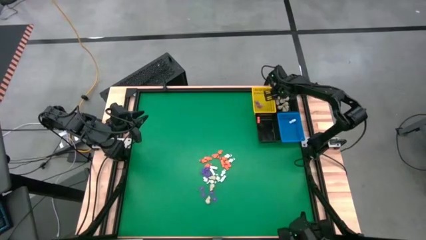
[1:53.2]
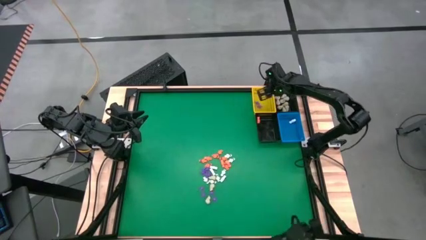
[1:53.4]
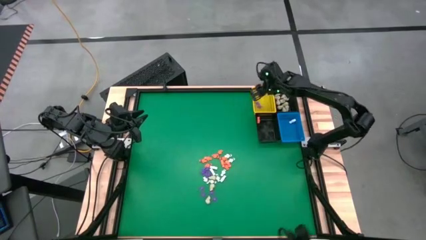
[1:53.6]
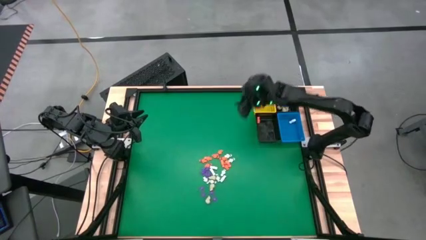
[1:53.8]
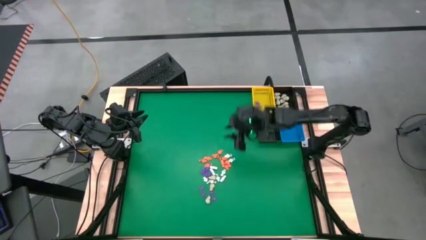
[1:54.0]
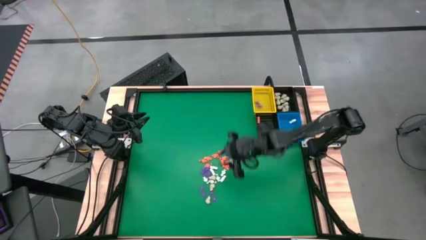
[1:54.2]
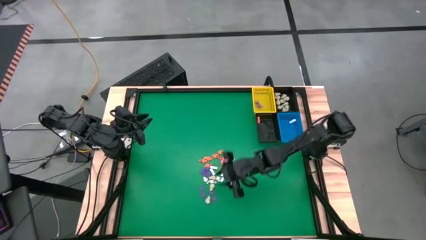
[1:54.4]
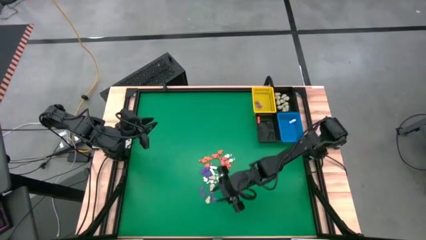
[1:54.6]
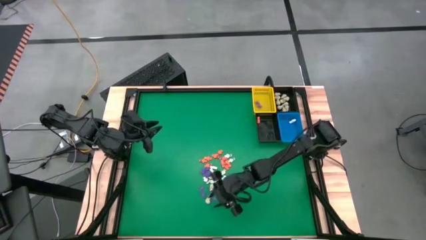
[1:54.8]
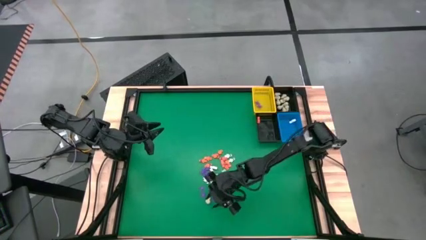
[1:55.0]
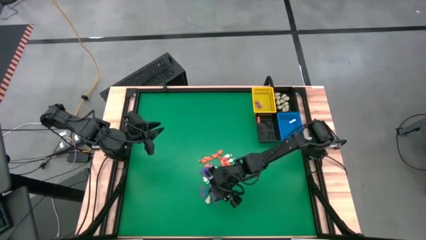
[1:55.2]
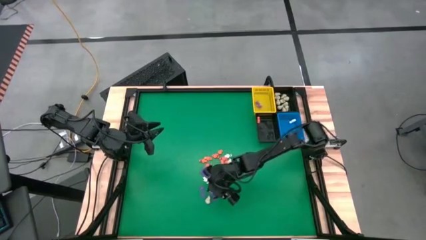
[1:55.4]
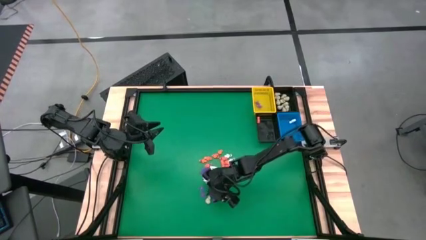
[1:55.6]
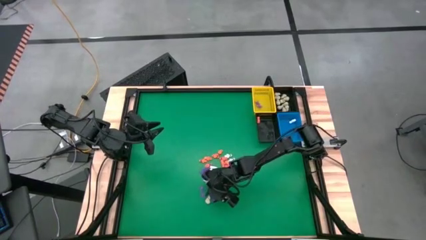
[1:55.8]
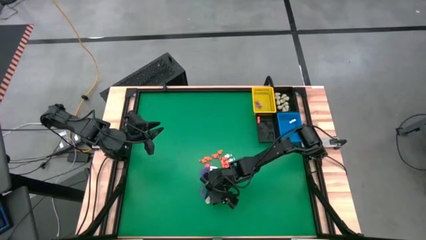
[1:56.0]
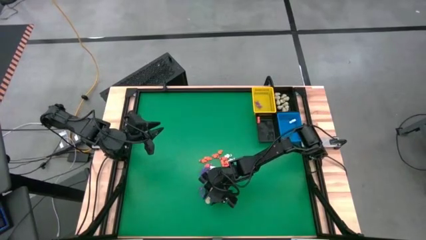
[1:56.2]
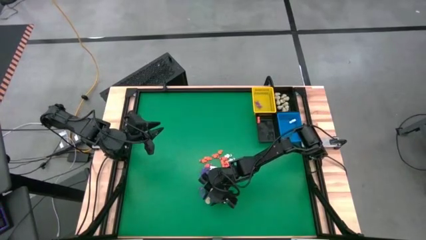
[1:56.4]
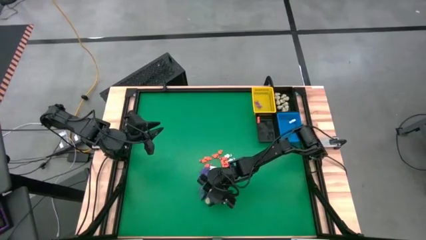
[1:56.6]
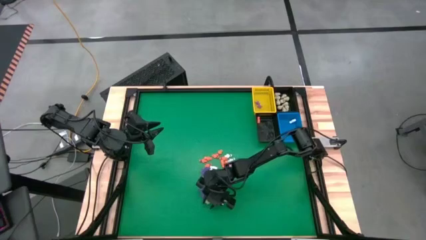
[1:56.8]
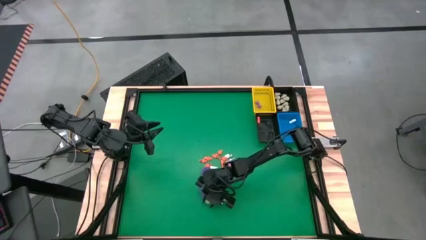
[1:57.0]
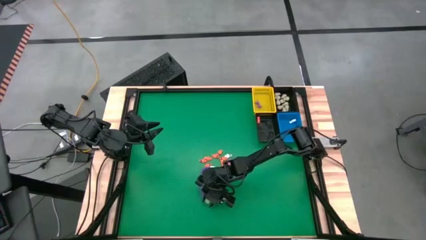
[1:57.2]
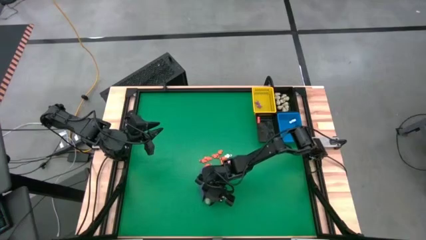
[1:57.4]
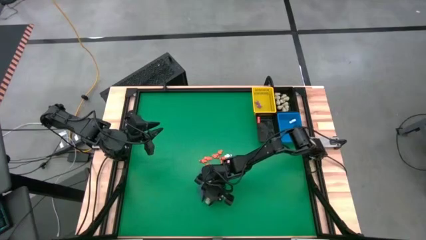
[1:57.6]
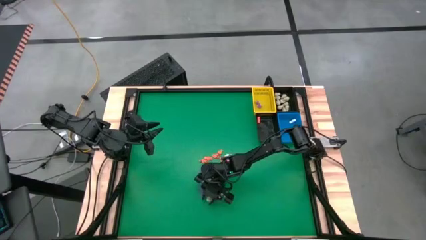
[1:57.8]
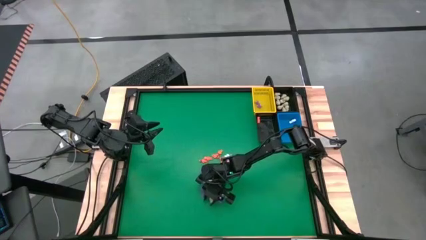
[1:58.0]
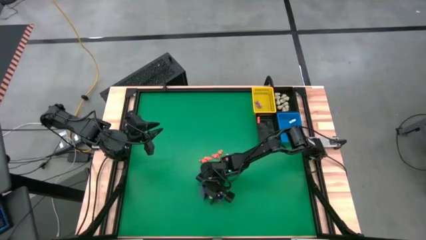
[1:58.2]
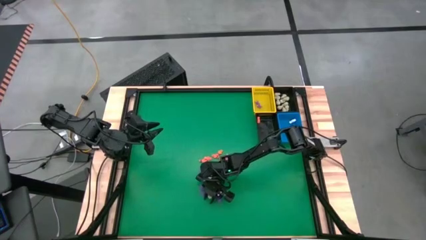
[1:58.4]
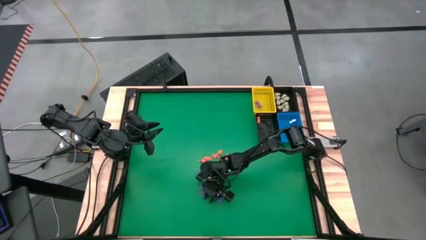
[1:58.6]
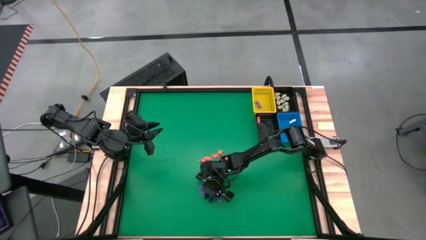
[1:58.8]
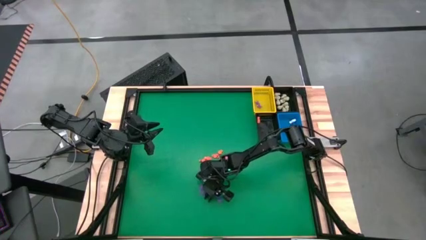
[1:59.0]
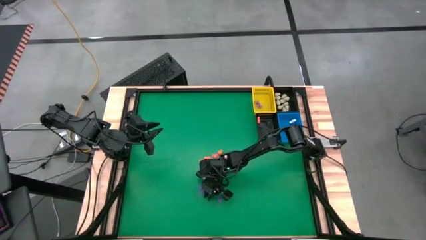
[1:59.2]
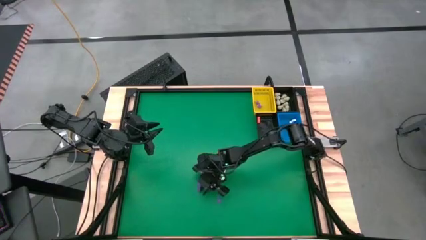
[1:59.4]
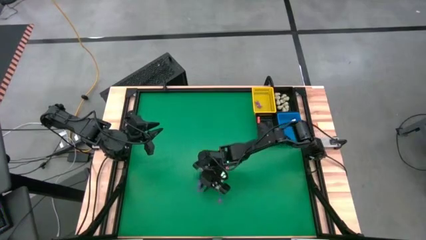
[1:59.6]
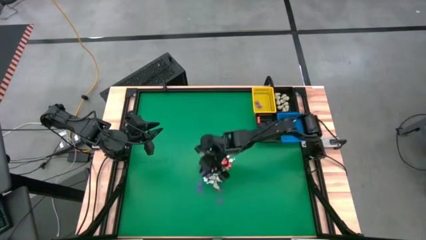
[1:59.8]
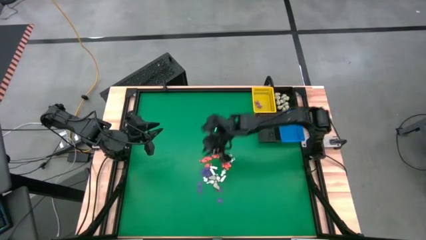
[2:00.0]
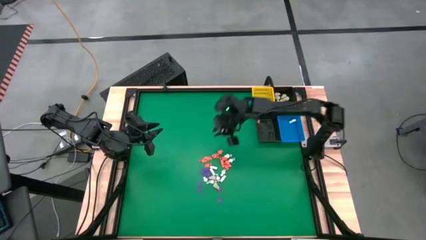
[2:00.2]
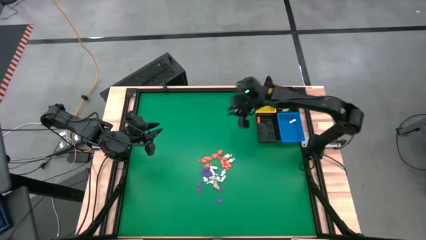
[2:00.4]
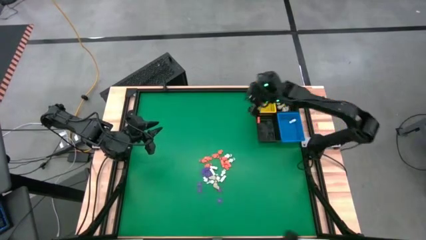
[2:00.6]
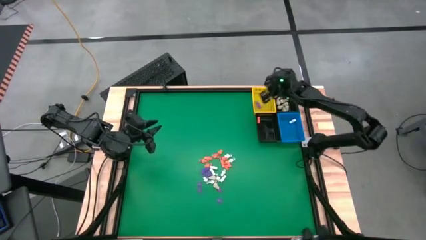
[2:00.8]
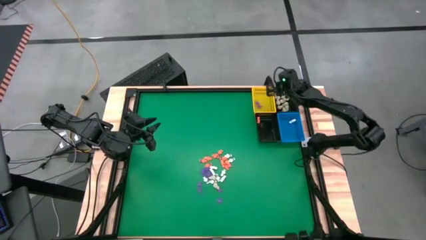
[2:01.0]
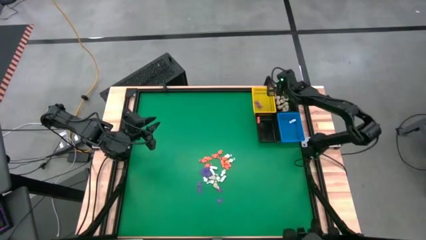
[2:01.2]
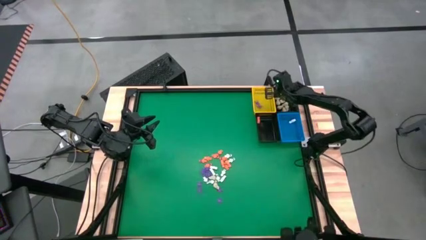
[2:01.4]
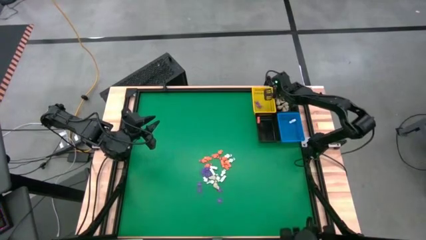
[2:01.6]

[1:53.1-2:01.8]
Task: Sort Halloween decoration
Put the gray skull toy into the top black basket

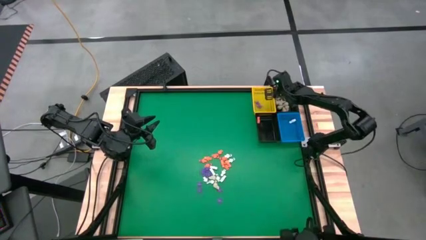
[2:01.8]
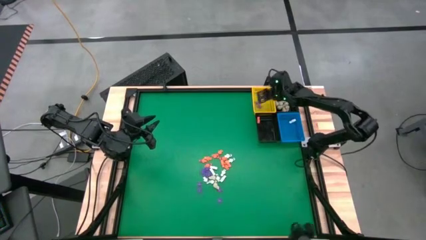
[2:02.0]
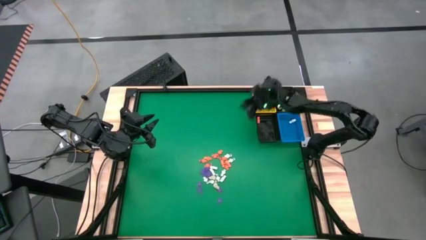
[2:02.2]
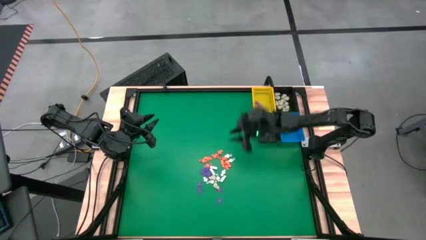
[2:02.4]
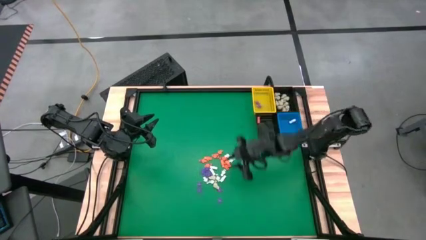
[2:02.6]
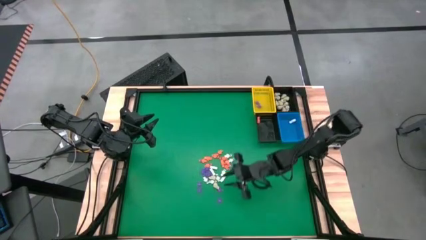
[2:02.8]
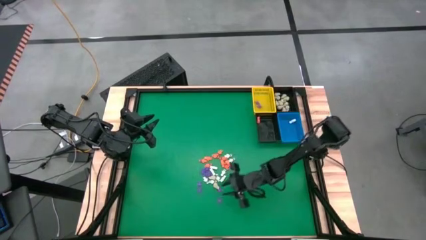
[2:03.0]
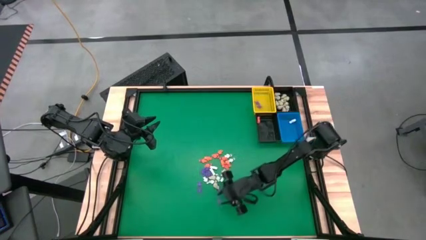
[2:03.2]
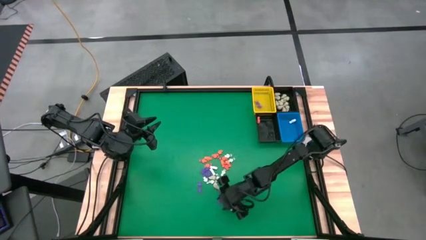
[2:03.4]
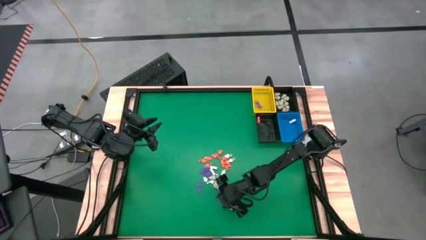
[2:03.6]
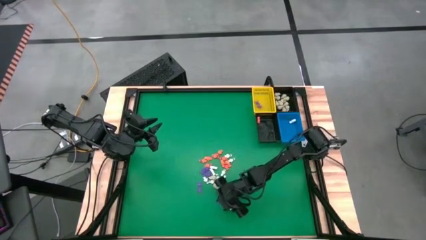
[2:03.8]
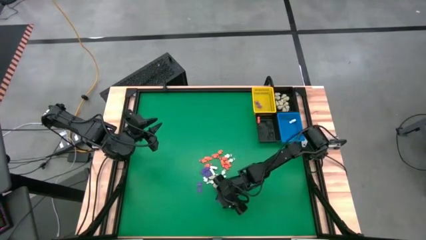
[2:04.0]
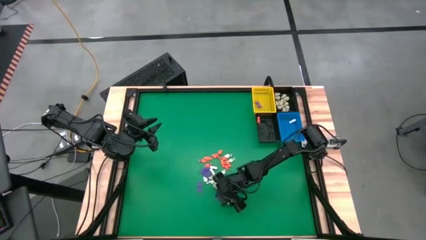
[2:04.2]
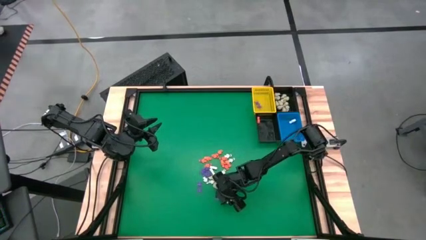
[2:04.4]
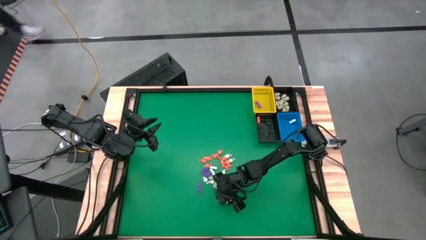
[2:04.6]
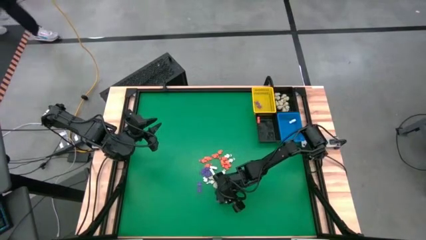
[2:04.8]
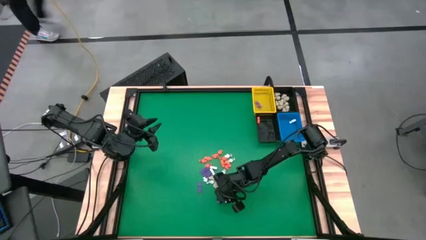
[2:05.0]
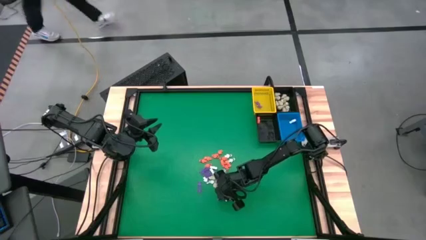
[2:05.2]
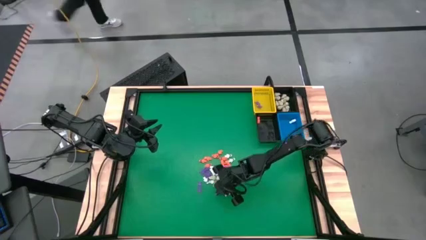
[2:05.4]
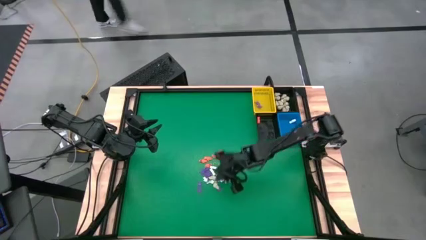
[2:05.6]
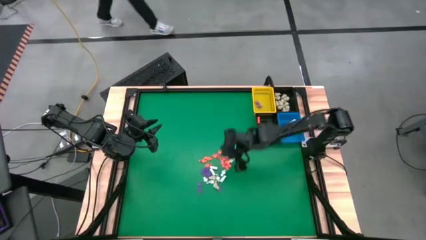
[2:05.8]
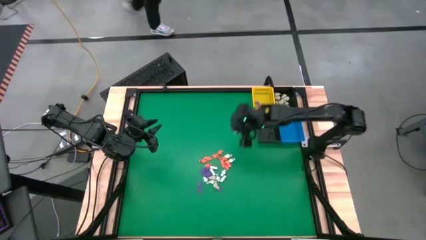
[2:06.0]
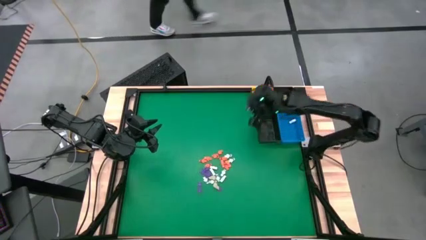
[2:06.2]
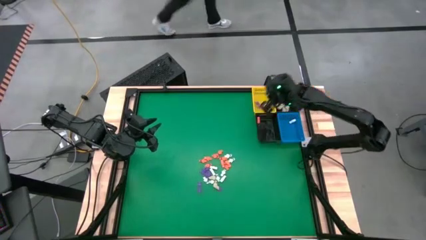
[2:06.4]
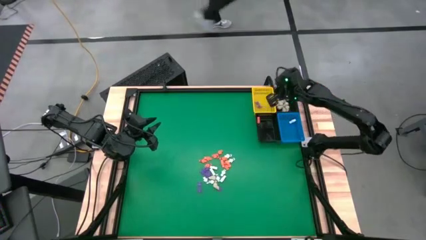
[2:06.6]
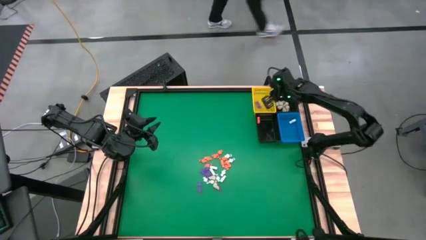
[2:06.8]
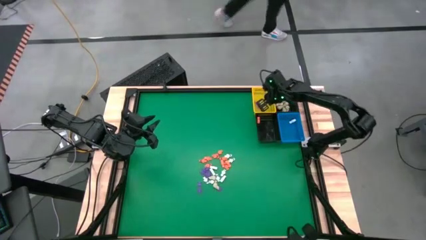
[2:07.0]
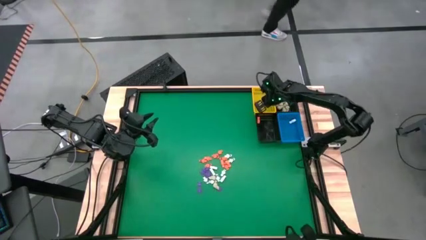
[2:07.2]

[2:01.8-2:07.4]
Put the purple spider toy into the yellow basket

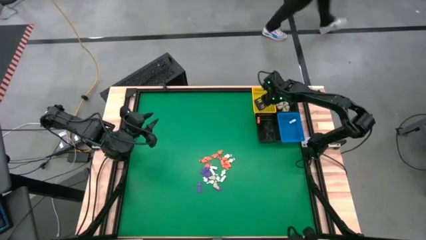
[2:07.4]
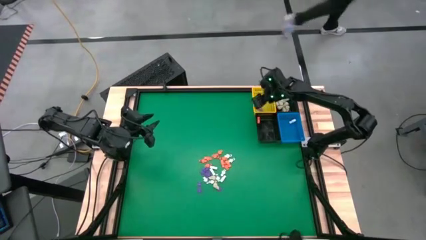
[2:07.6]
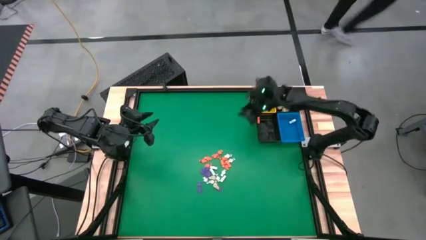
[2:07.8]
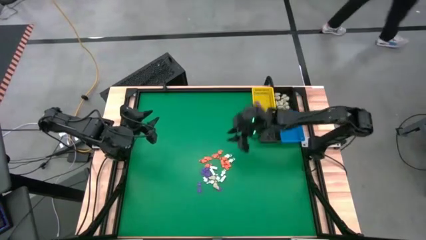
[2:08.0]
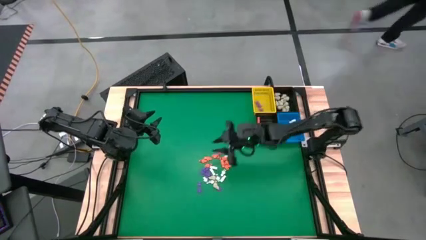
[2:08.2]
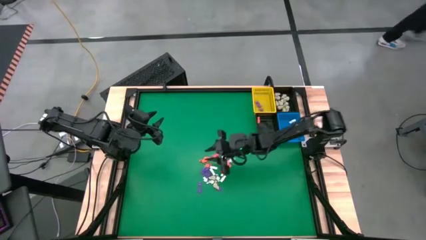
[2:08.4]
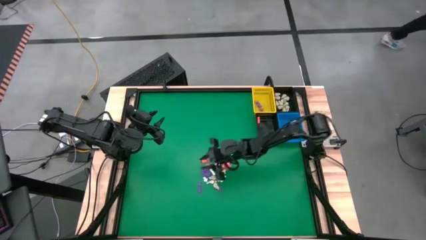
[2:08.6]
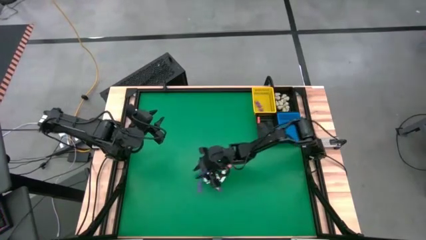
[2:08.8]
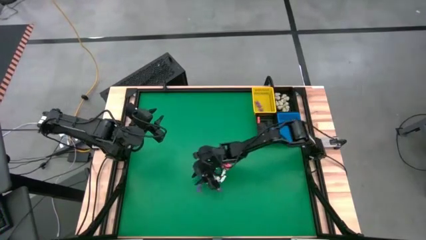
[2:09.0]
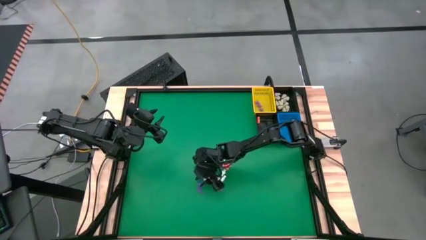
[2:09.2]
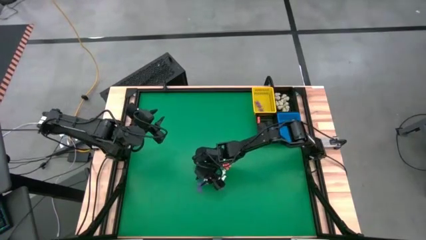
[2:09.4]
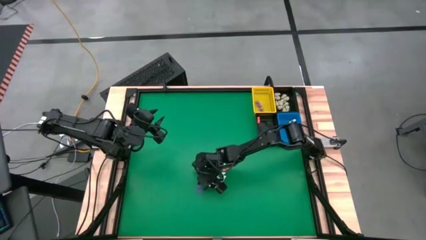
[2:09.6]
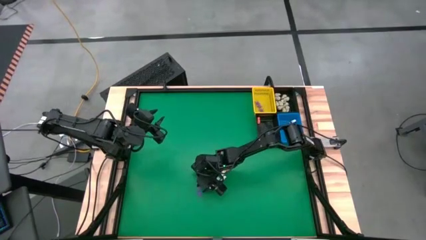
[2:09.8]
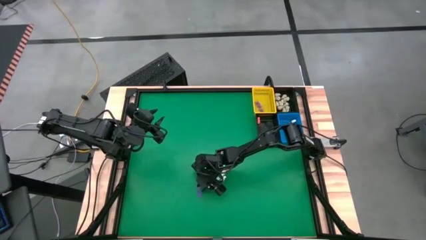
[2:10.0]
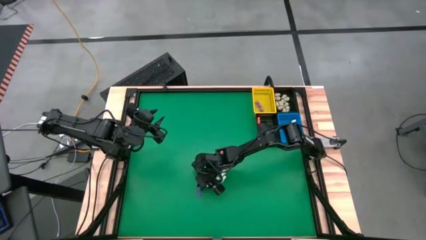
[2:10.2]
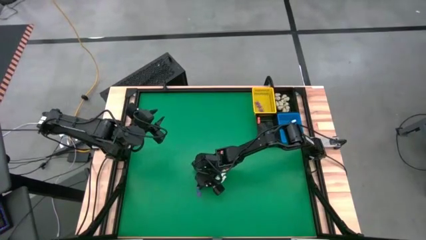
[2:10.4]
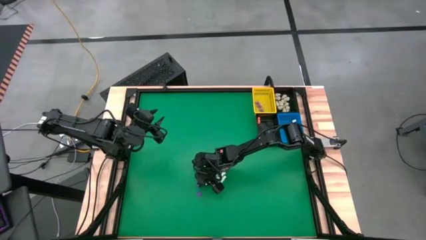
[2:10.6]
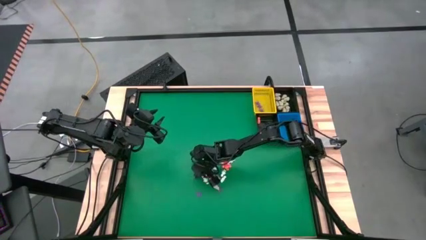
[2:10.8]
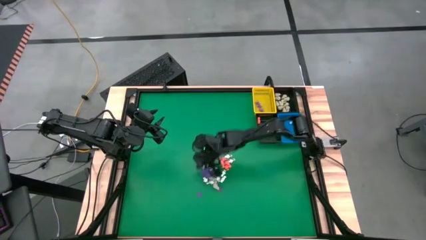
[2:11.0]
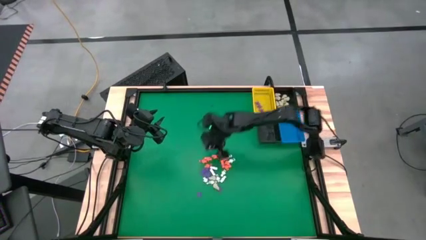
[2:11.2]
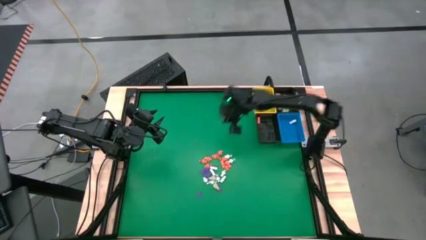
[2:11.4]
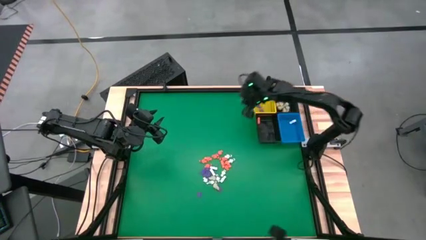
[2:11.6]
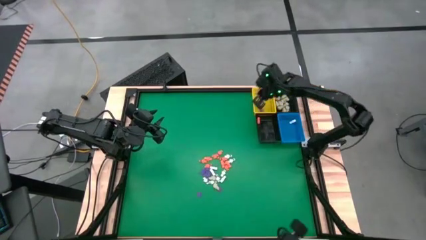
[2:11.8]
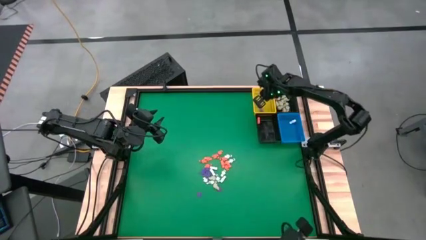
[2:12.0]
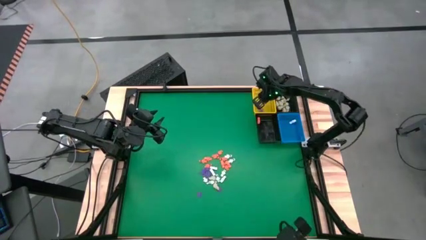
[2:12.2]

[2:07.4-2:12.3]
Put the purple spider toy into the yellow basket
